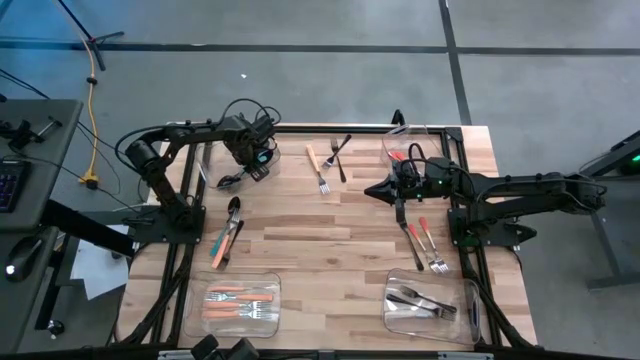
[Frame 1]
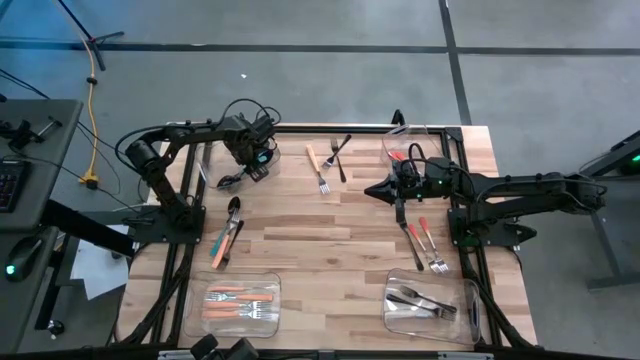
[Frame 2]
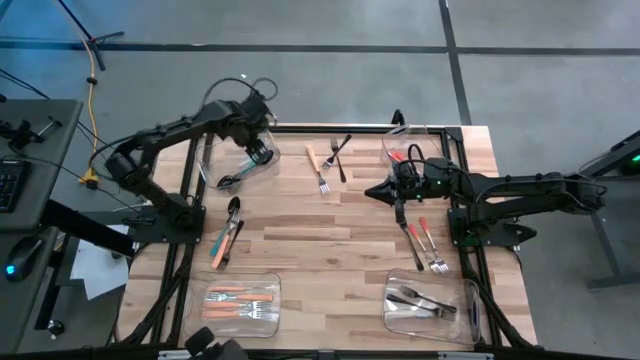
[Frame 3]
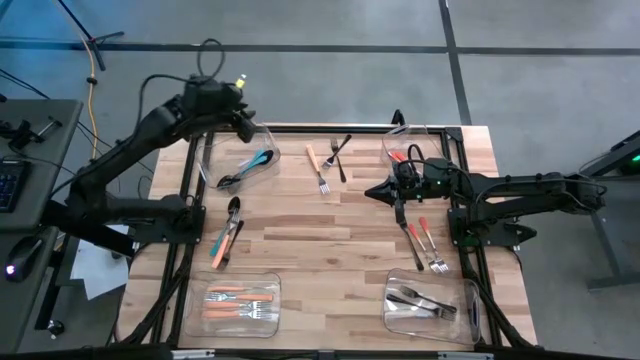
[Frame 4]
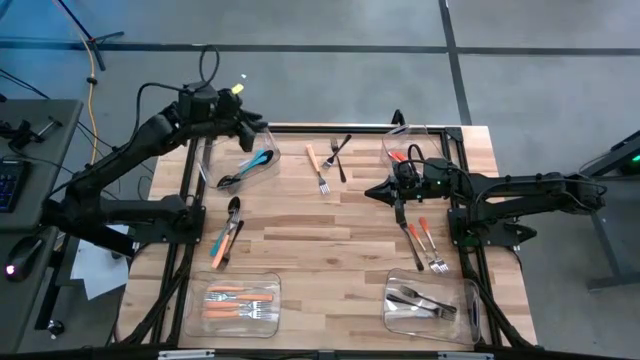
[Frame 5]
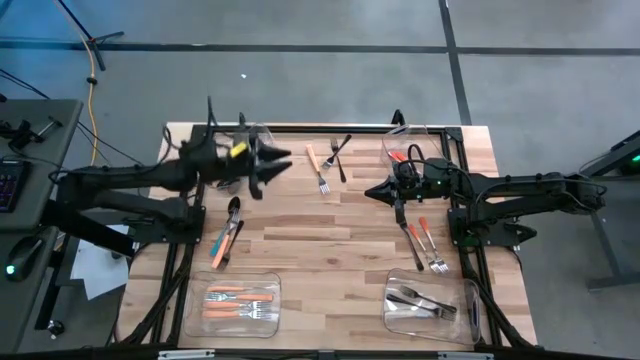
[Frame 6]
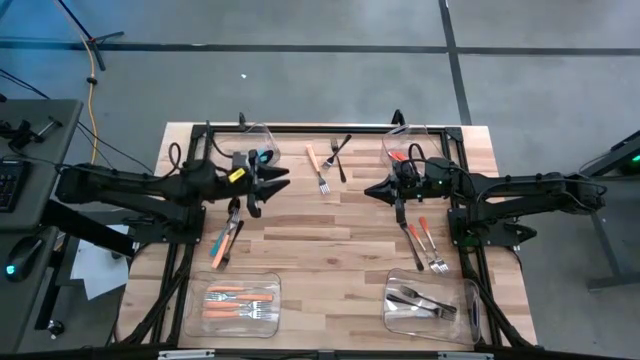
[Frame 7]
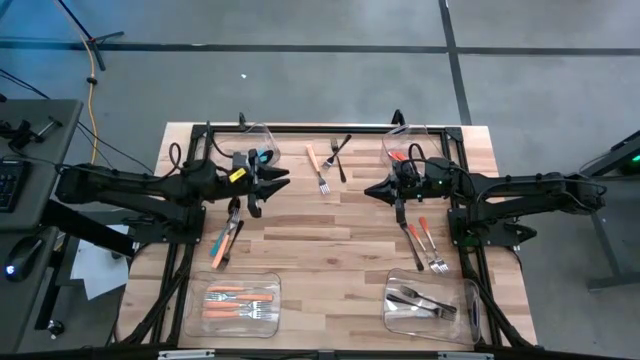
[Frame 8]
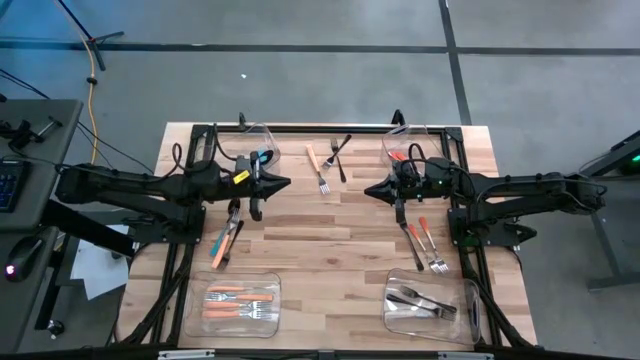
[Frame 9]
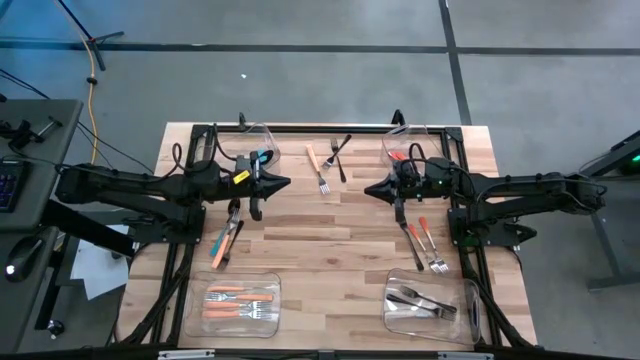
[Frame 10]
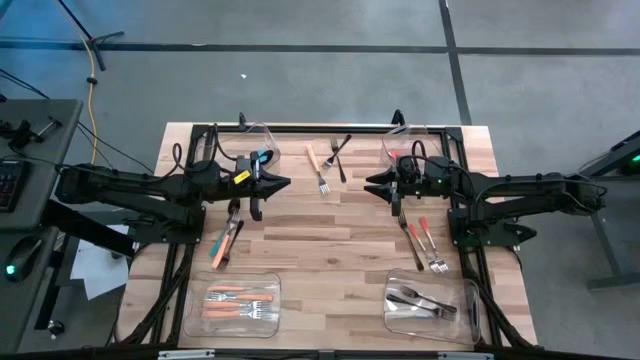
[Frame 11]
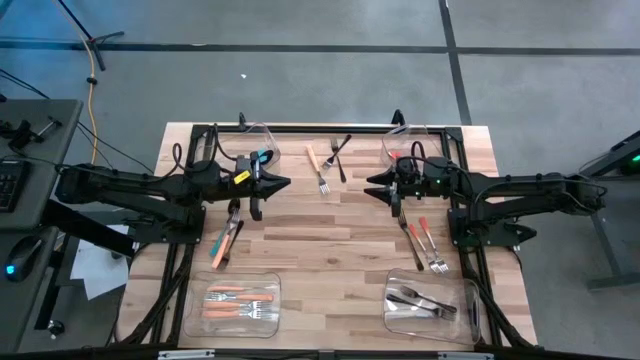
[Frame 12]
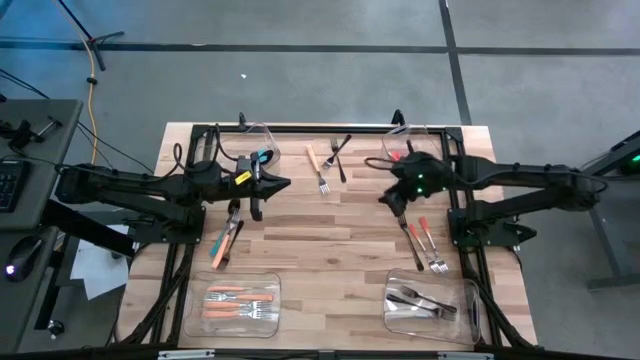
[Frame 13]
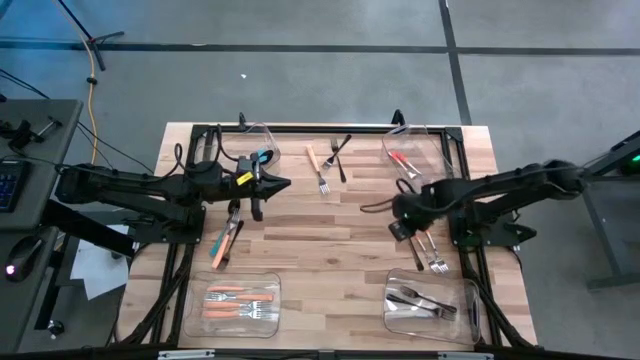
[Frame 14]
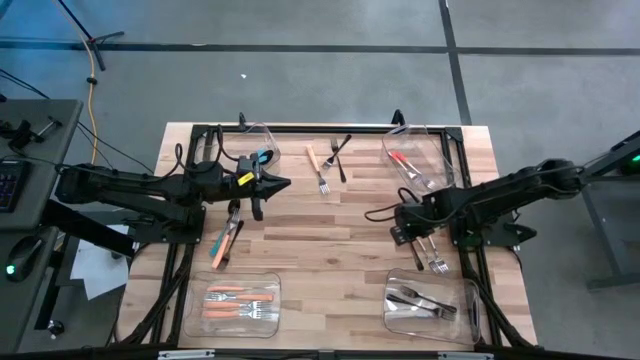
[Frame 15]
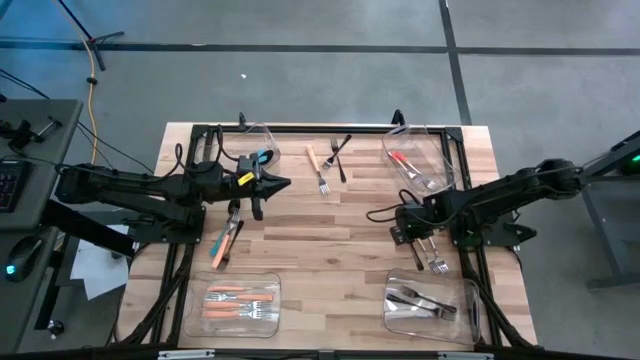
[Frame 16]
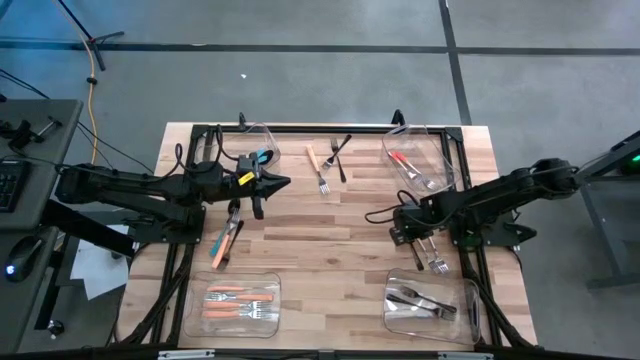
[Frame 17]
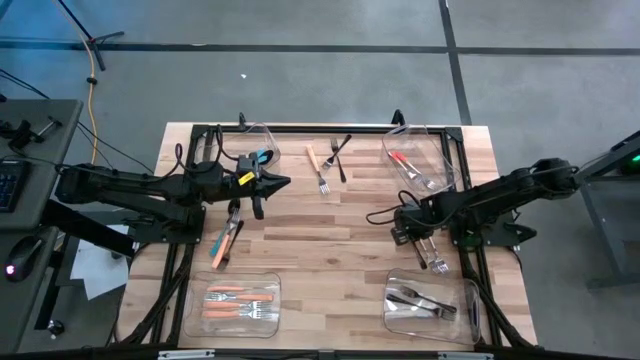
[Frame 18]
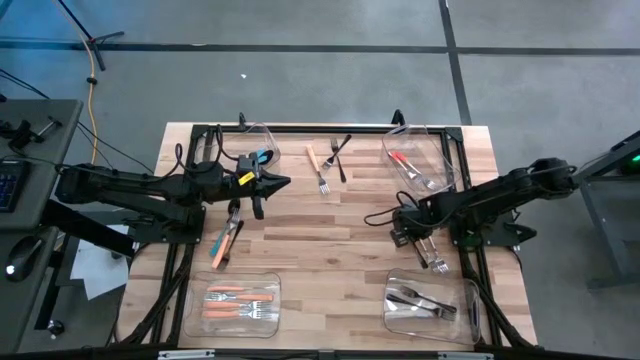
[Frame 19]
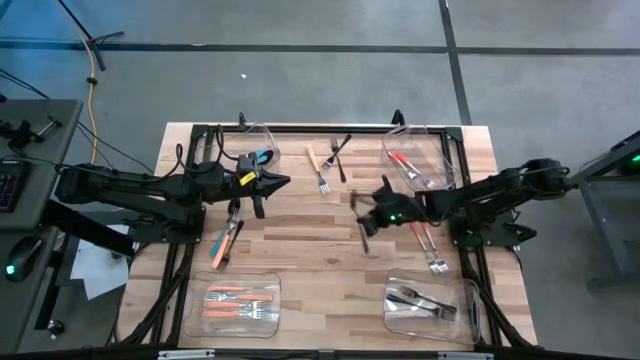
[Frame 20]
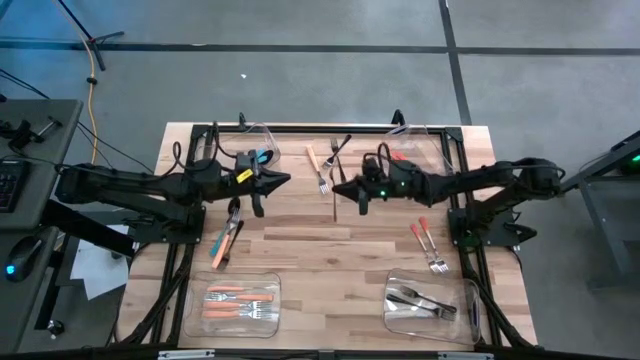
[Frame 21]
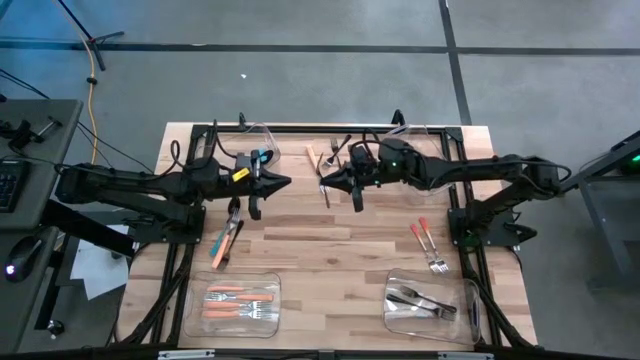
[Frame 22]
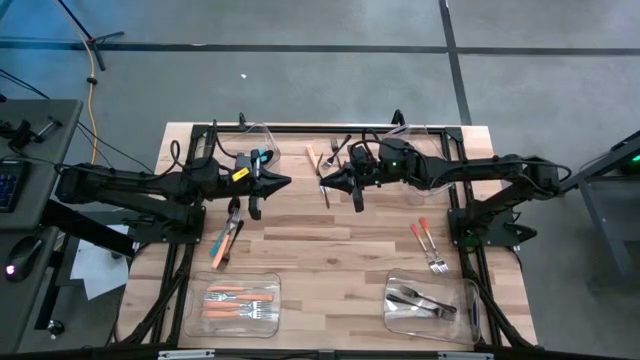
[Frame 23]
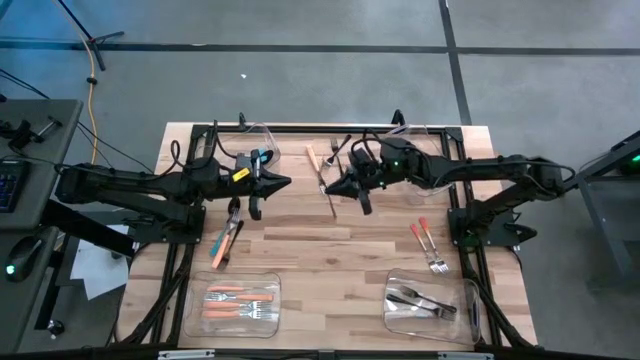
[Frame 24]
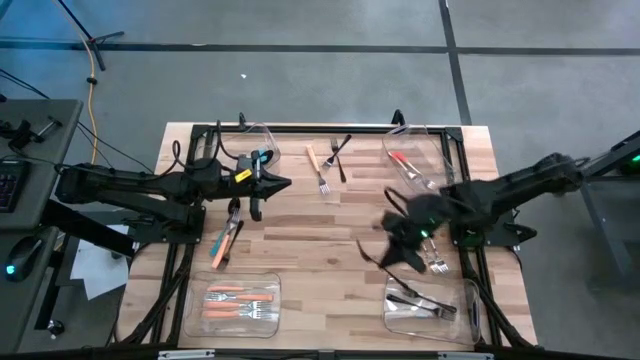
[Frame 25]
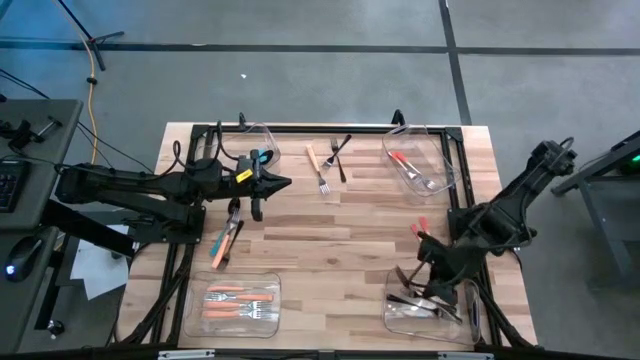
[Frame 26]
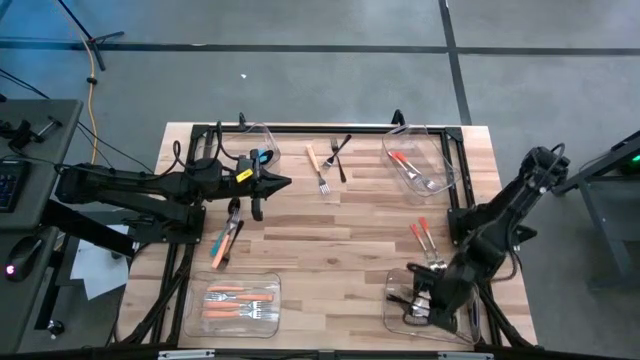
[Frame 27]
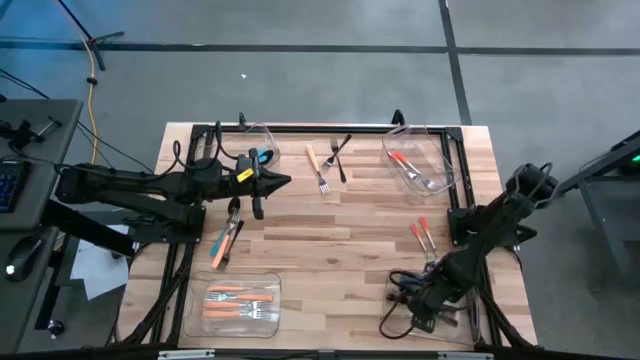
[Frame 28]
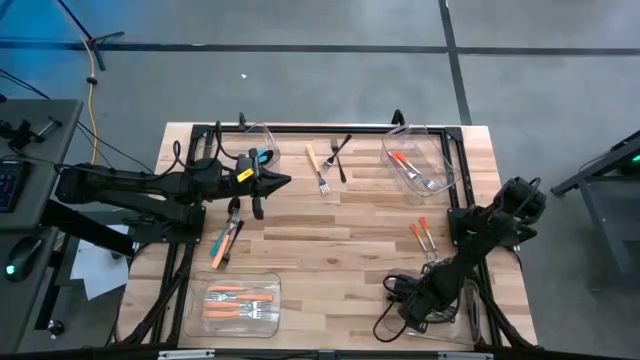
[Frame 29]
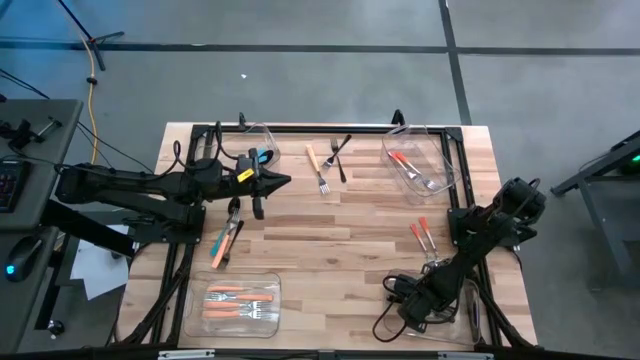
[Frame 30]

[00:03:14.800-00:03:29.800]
Task: Sort silverware by color (type)
Put the black fork into the bottom right transparent bin

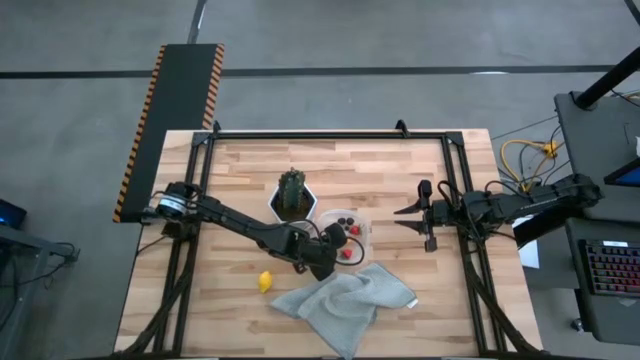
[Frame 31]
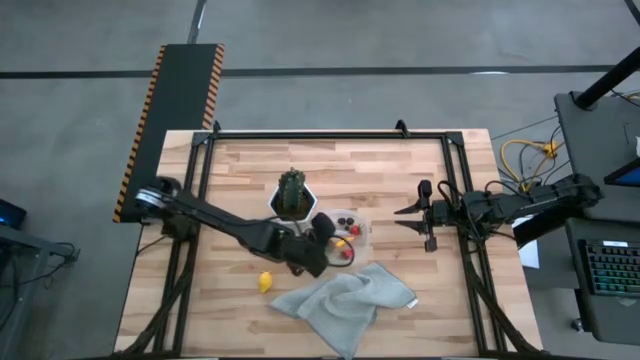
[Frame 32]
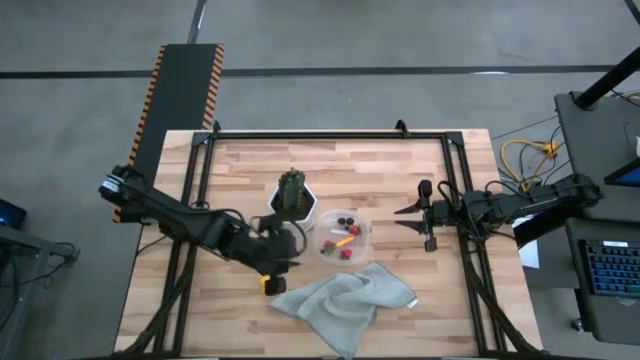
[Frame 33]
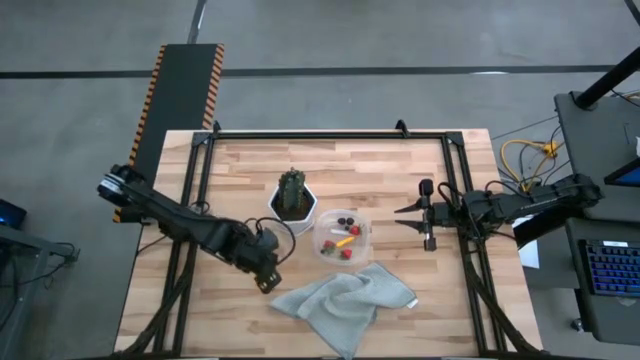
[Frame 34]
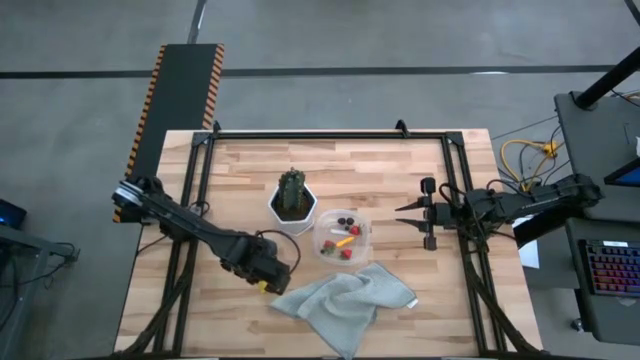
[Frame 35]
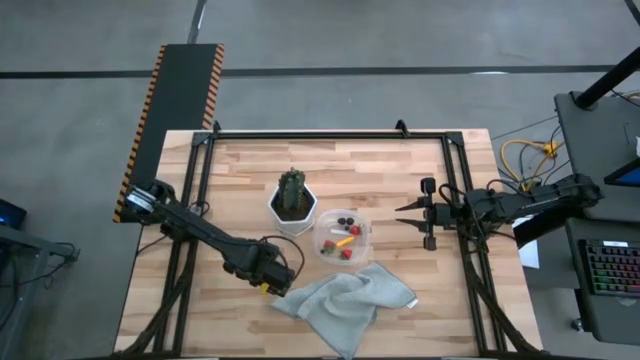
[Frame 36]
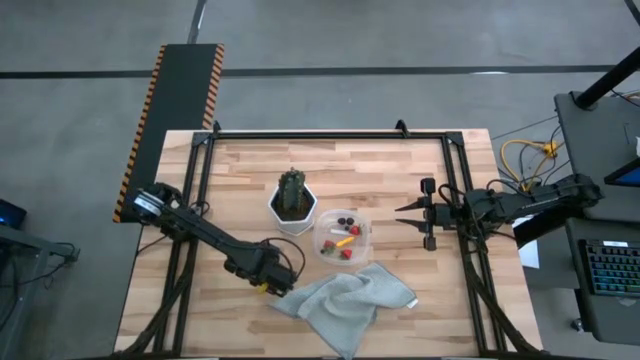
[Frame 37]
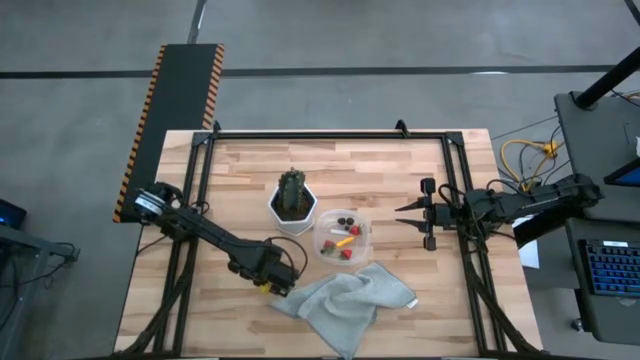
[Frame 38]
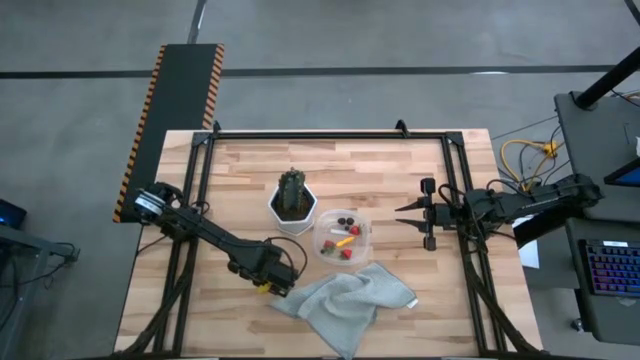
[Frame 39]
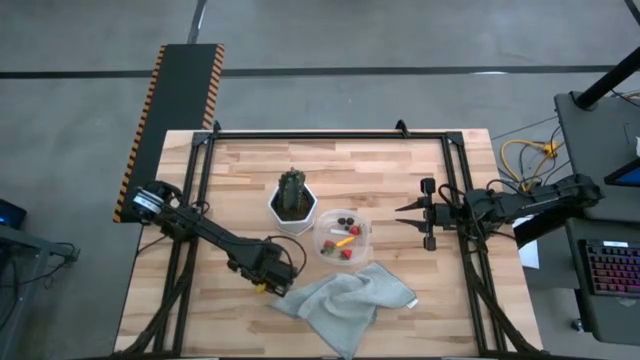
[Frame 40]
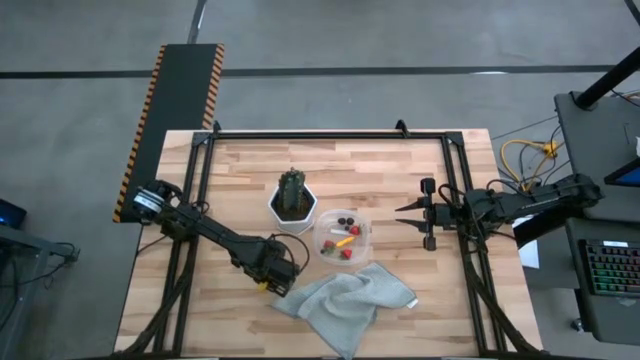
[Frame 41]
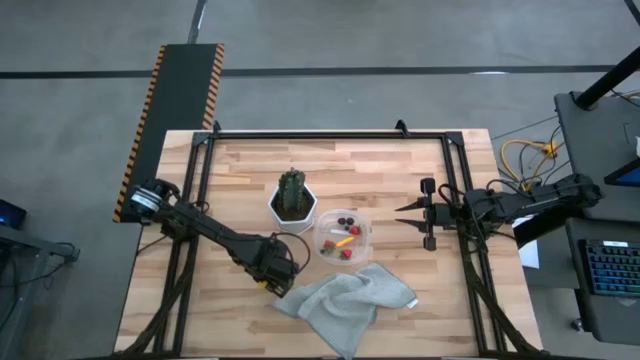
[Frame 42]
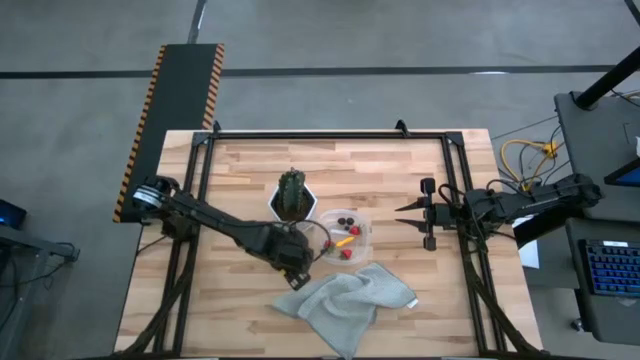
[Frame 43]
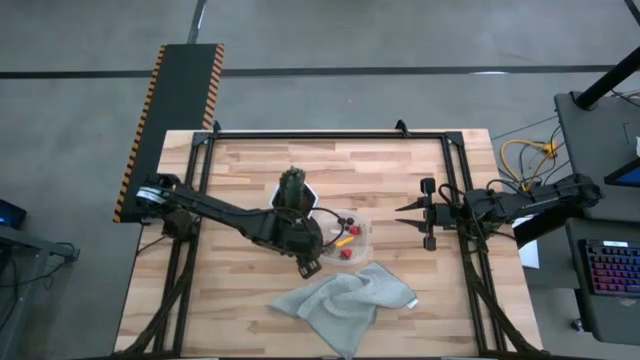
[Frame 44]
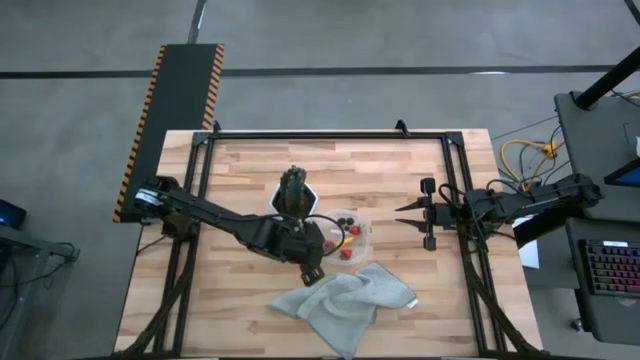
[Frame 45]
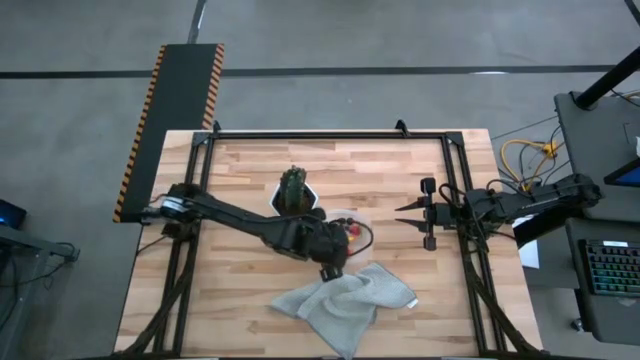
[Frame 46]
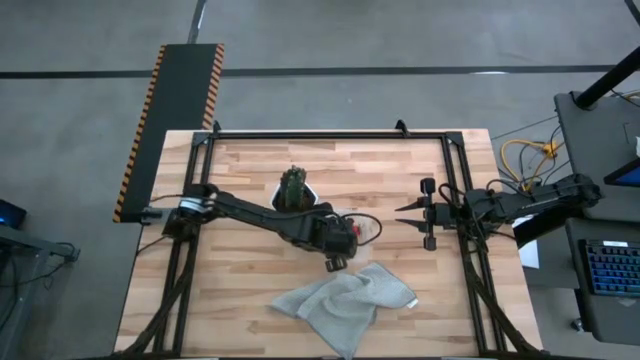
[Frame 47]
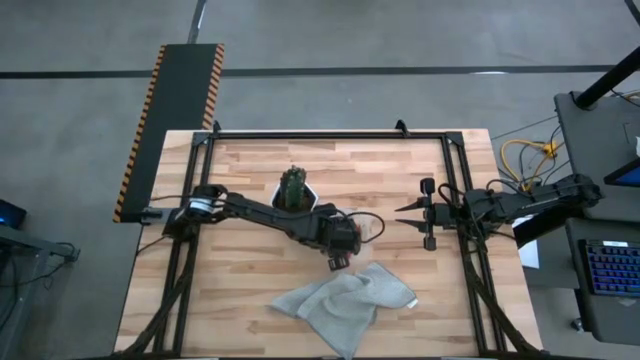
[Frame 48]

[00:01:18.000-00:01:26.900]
Task: Pick and placing Produce into tupperware
Put the lemon into the transparent bin
